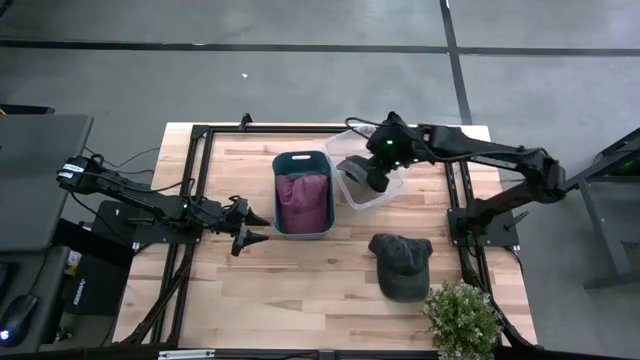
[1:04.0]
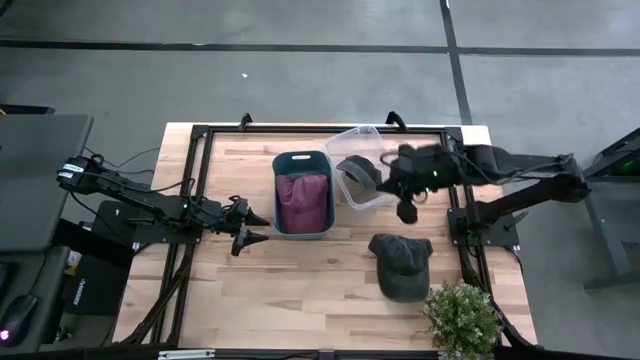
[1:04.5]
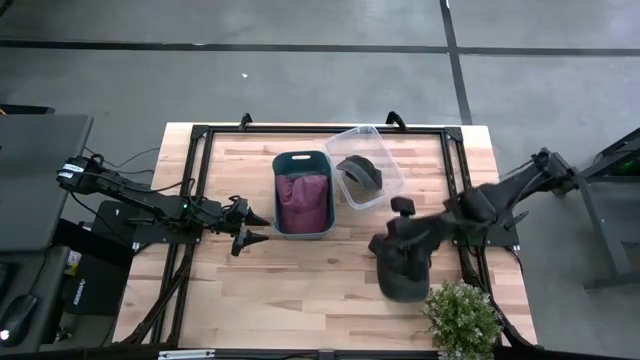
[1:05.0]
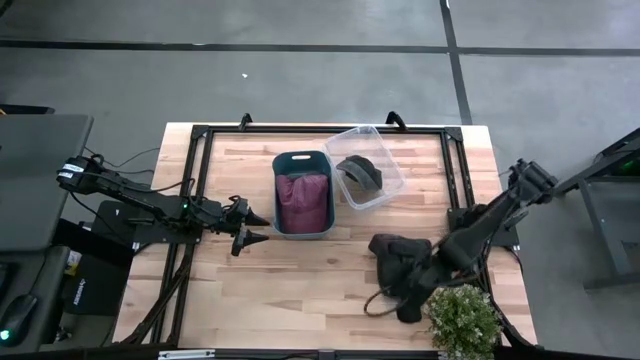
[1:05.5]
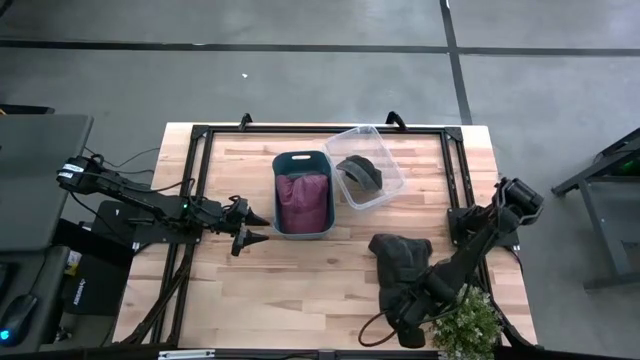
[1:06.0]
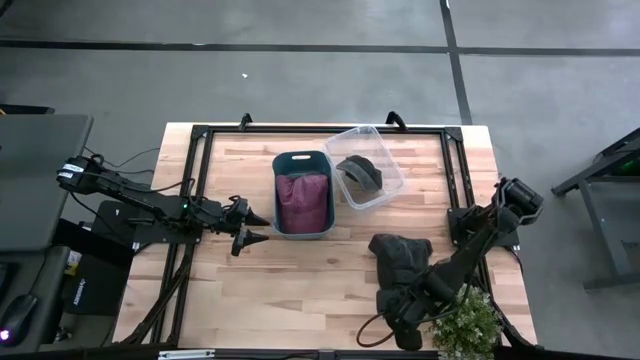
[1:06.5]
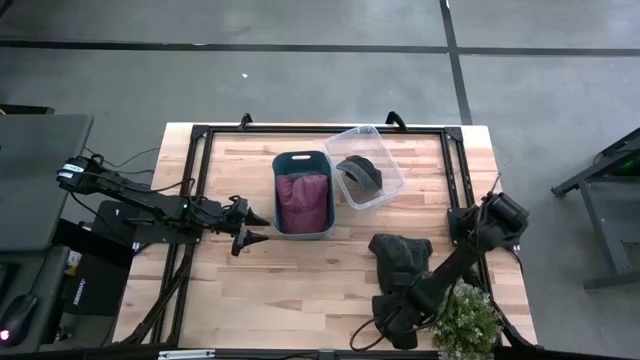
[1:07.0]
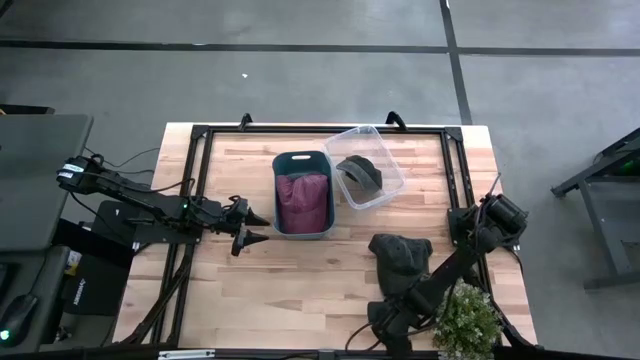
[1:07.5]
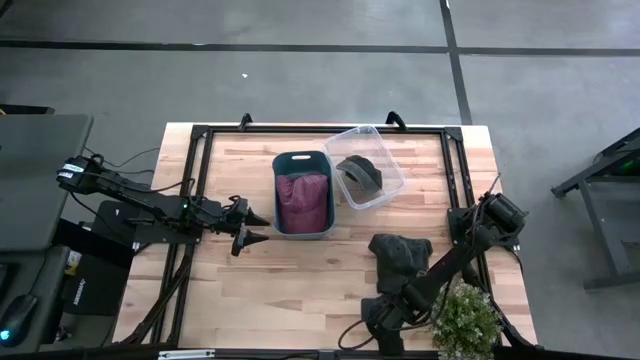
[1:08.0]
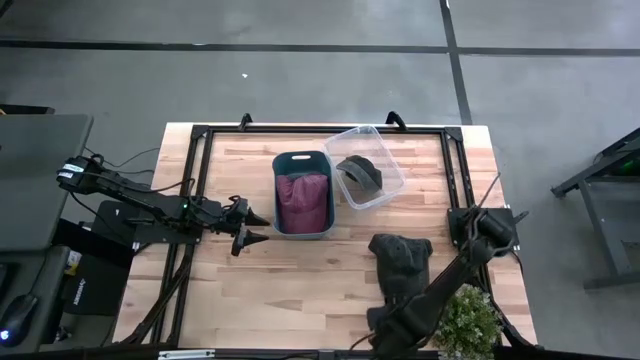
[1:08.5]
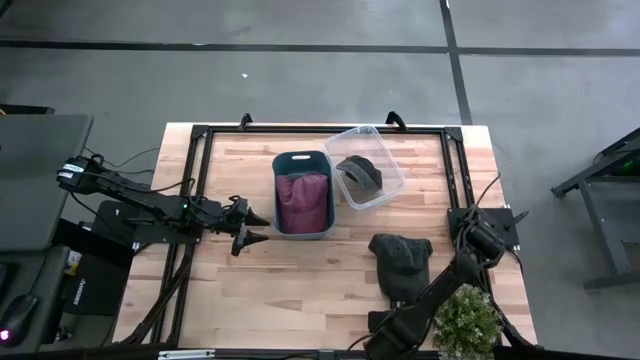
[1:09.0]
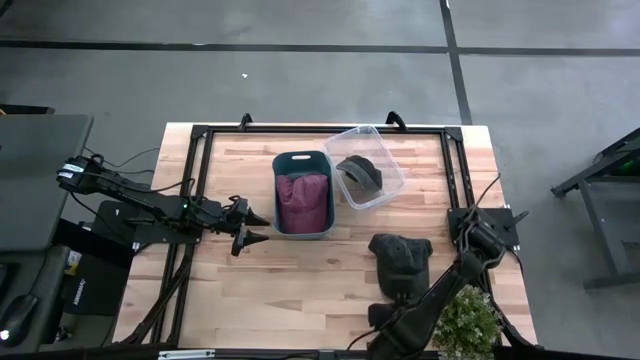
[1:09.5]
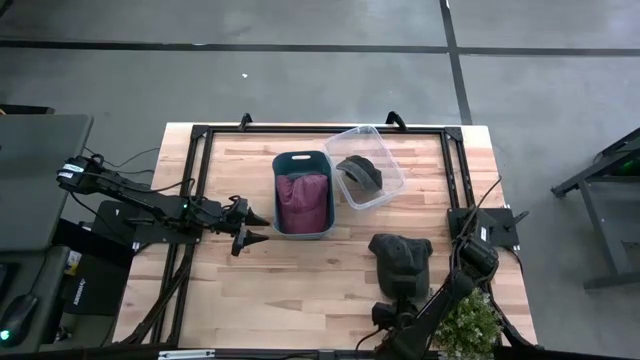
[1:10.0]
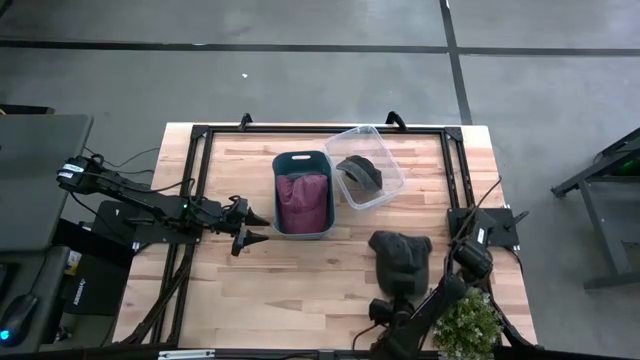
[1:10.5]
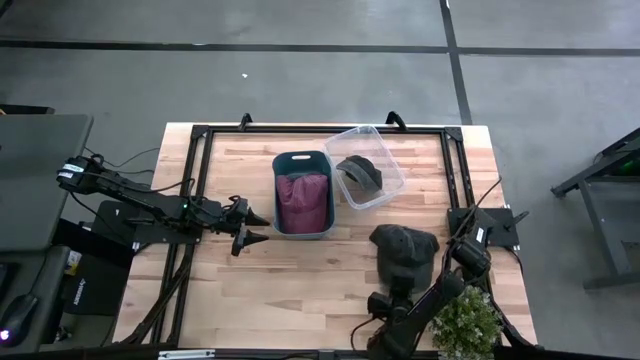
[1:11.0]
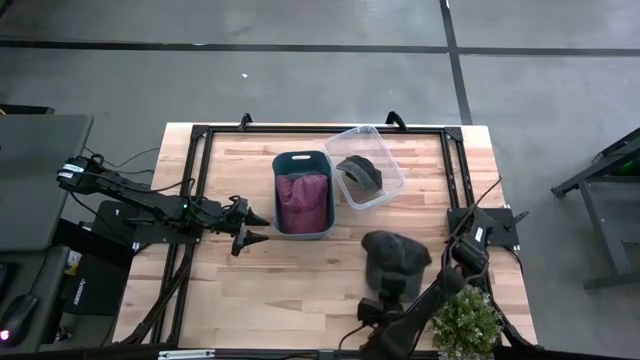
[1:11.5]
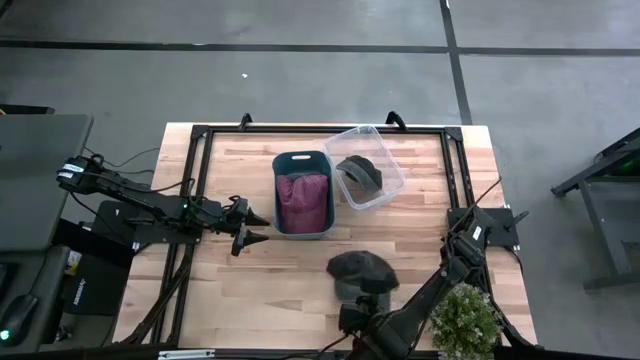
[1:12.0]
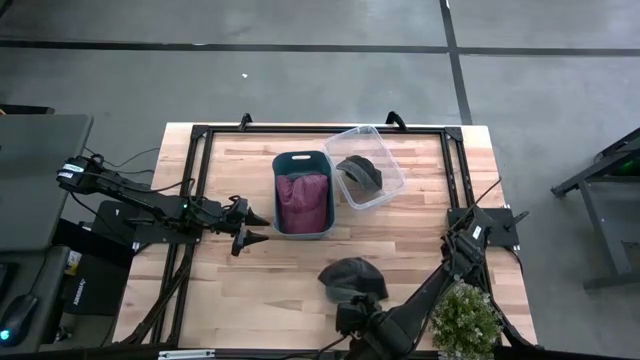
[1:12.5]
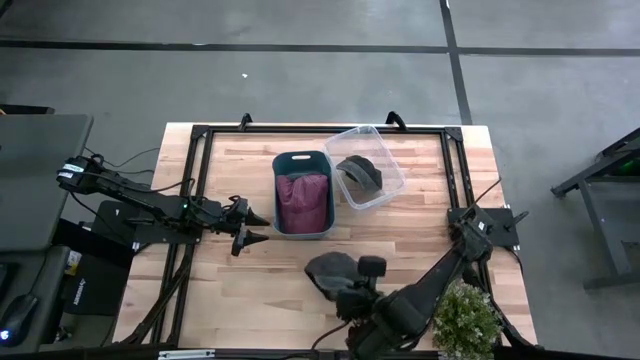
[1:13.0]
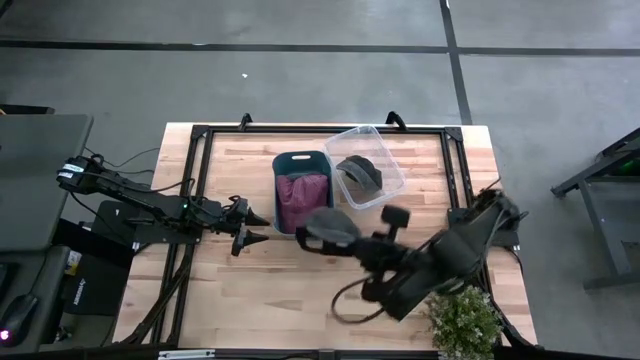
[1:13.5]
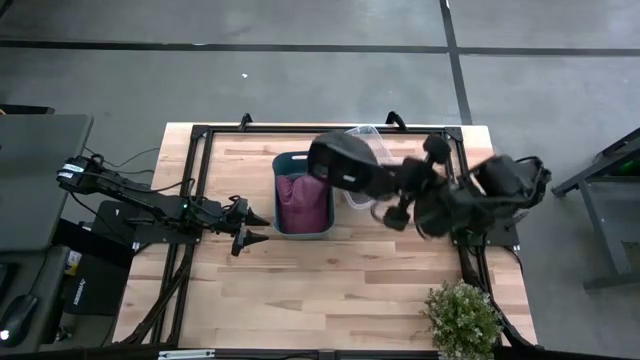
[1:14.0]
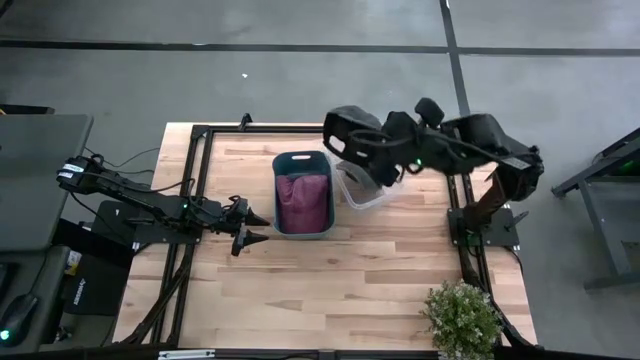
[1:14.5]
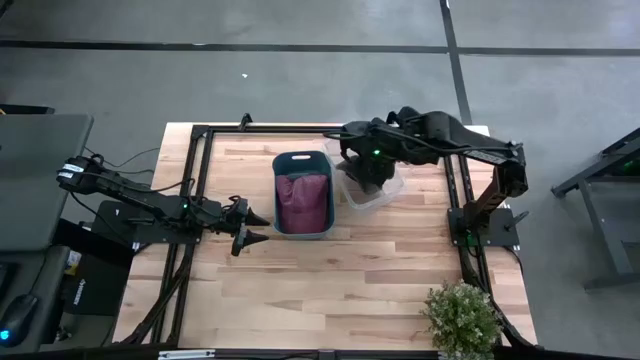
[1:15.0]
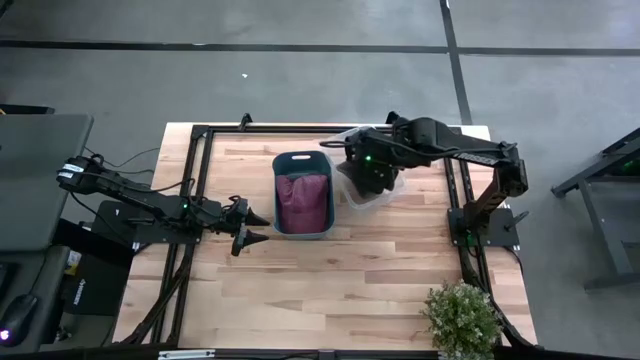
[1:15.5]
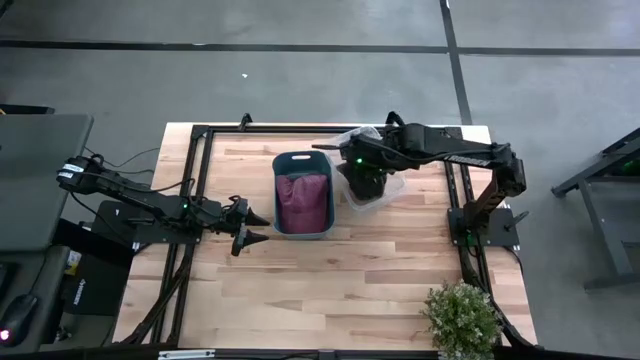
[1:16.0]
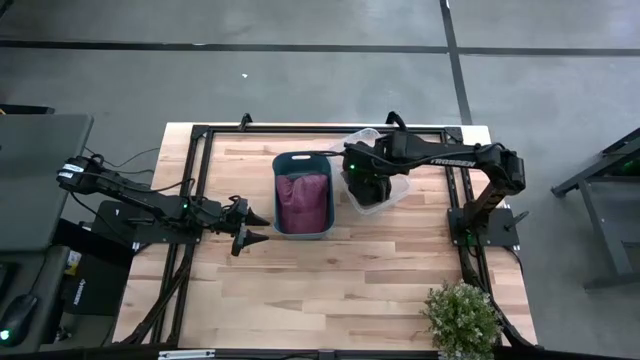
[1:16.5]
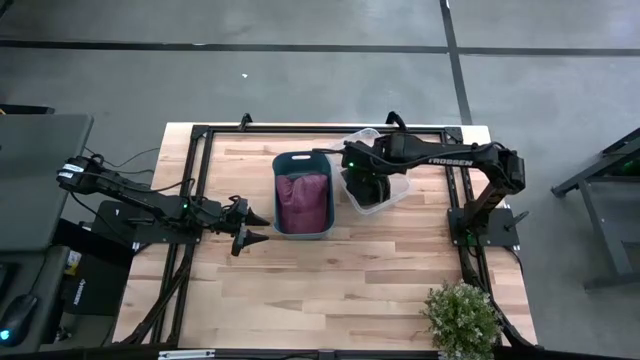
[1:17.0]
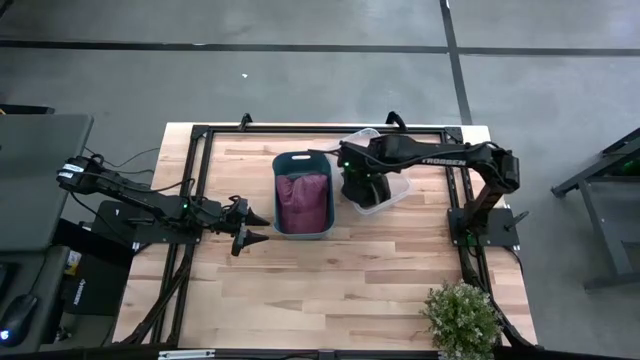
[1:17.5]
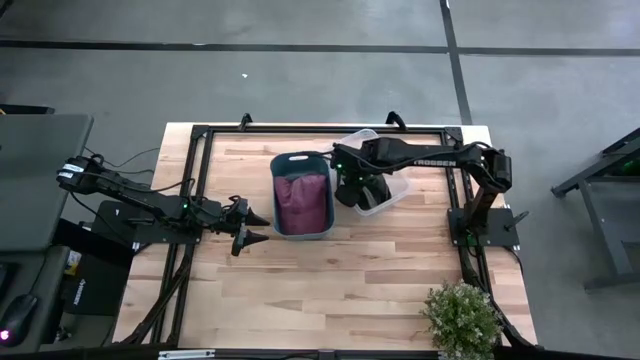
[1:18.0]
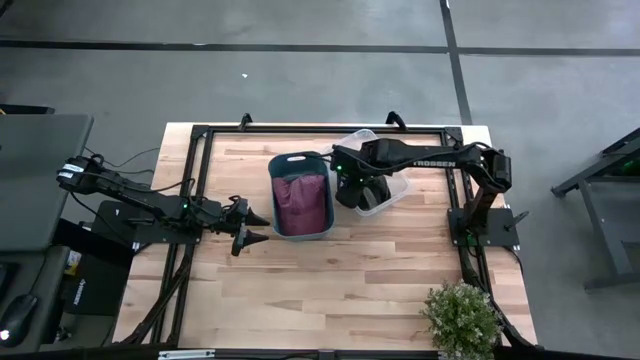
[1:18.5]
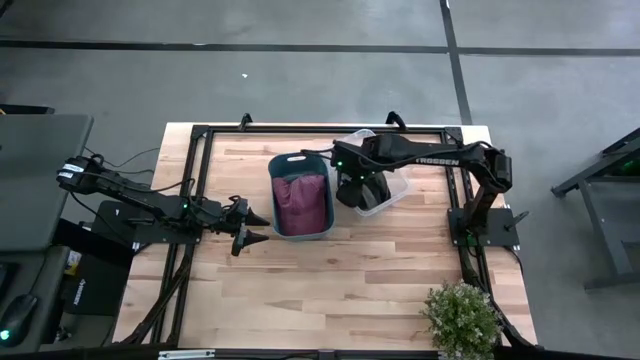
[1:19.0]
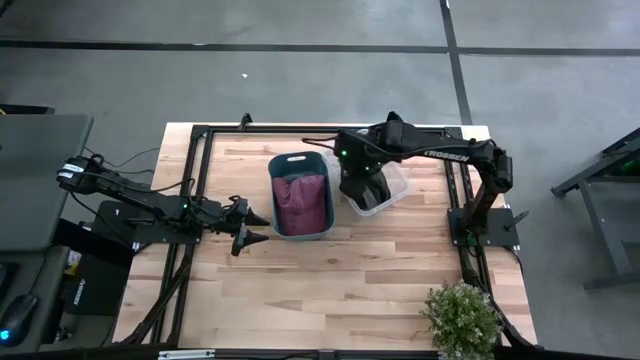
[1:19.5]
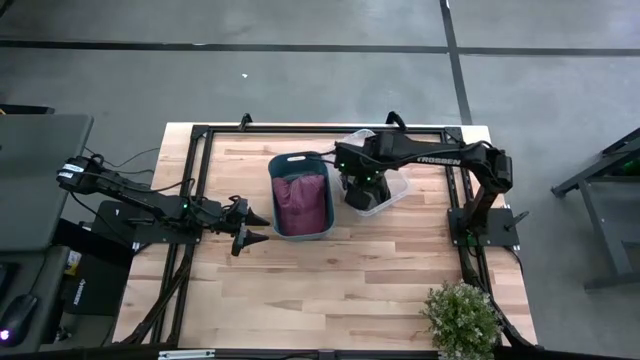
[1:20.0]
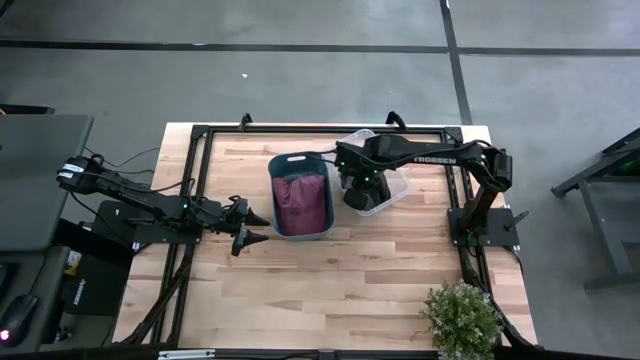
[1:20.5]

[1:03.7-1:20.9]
Task: Pick & Place hat
Put the black cap into the transparent bin

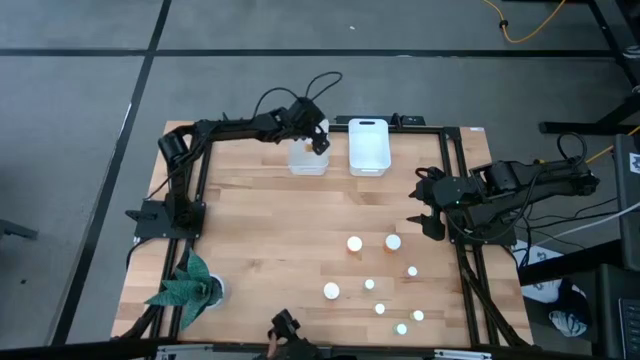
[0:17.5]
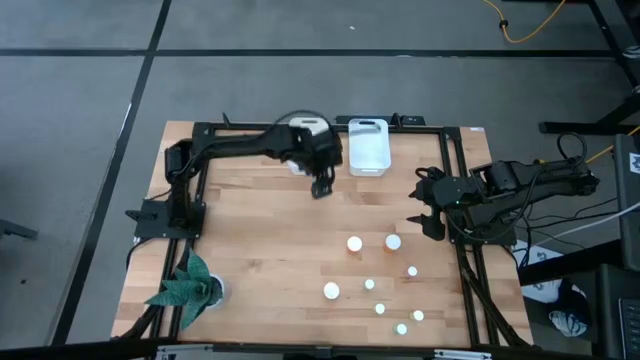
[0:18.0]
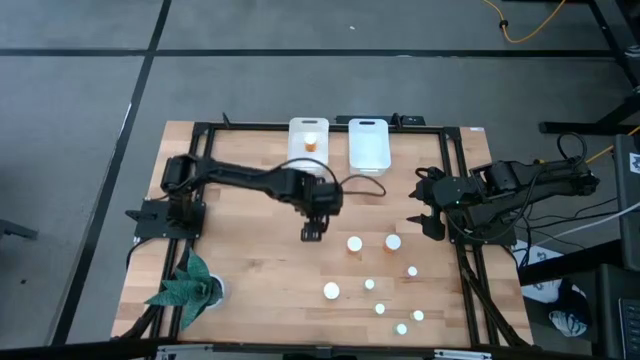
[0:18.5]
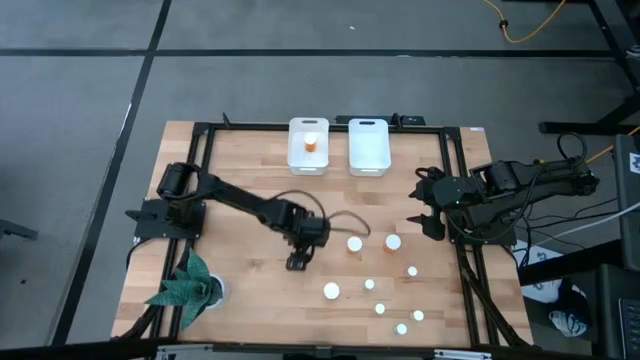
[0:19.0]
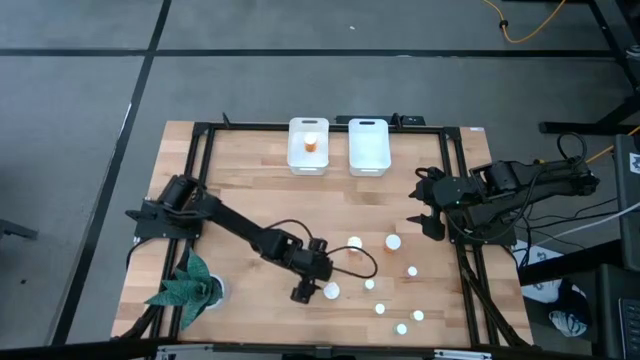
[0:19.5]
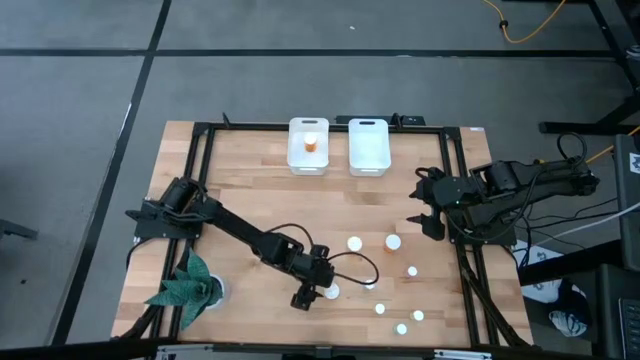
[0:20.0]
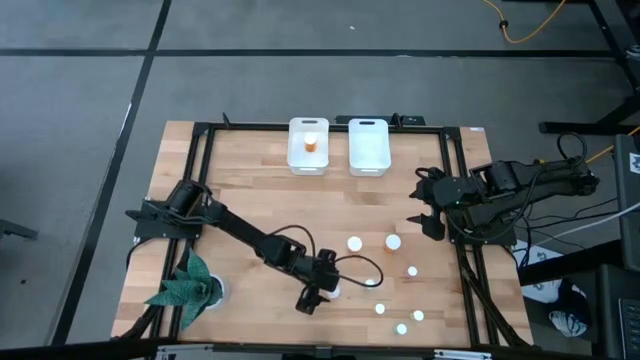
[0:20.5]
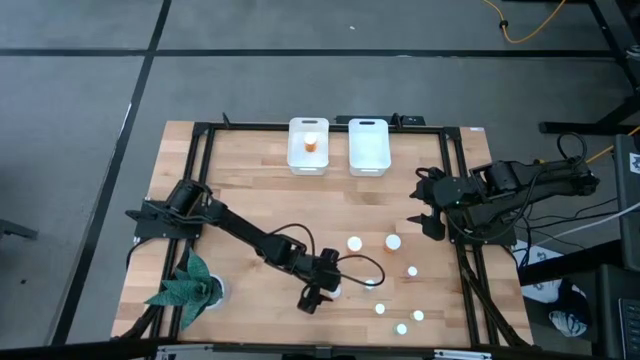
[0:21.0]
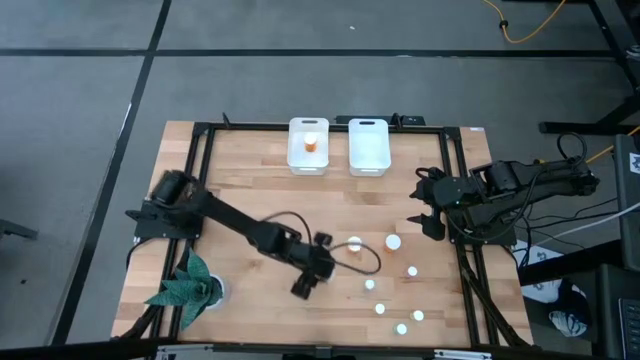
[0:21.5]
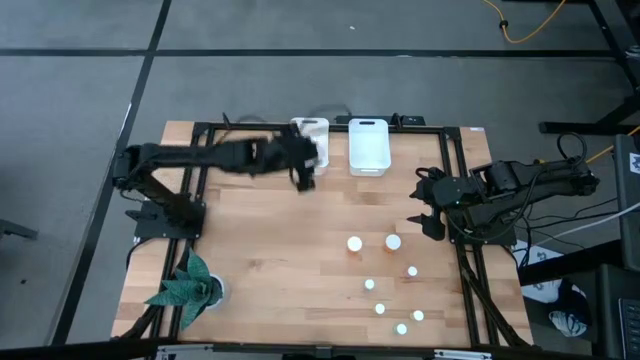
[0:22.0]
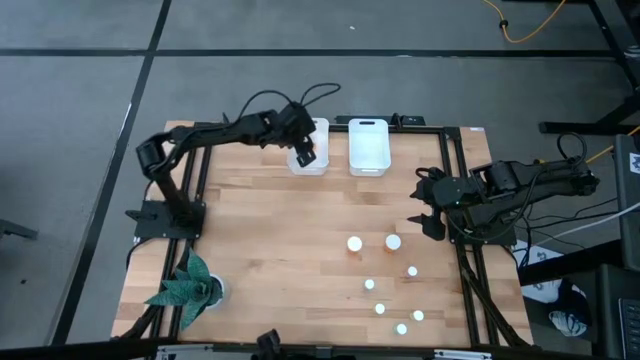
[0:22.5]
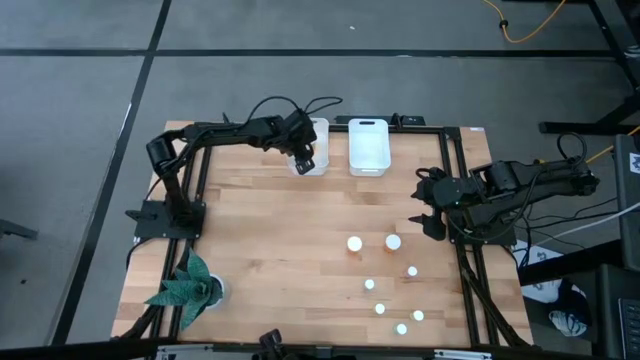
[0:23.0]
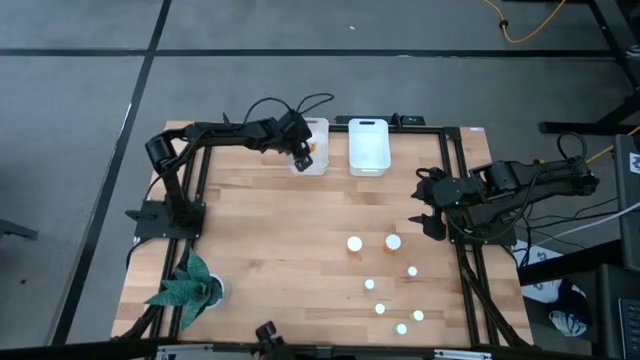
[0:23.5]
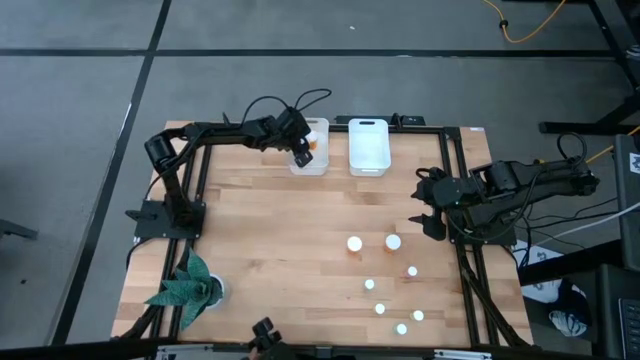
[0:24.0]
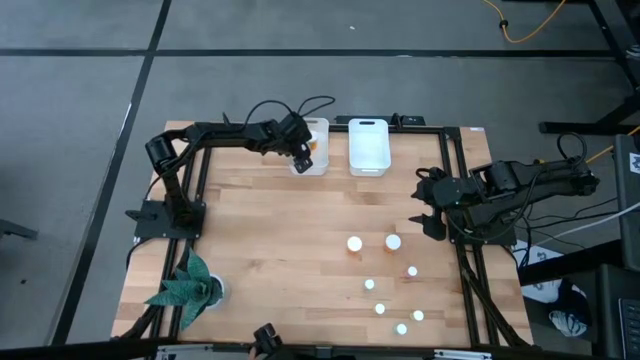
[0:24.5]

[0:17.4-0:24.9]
Task: Pick and place medicine bottles into bin by pill shape (circle, oval)
Put the orange capsule bottle into the left white bin
